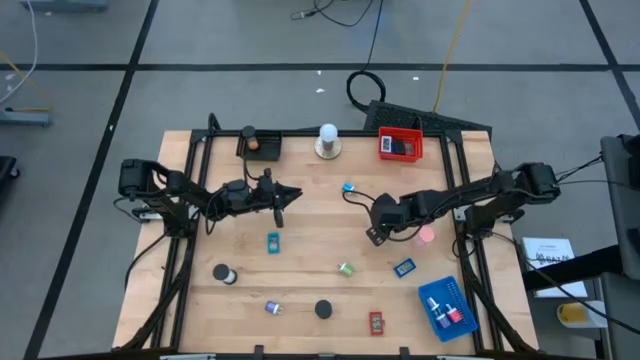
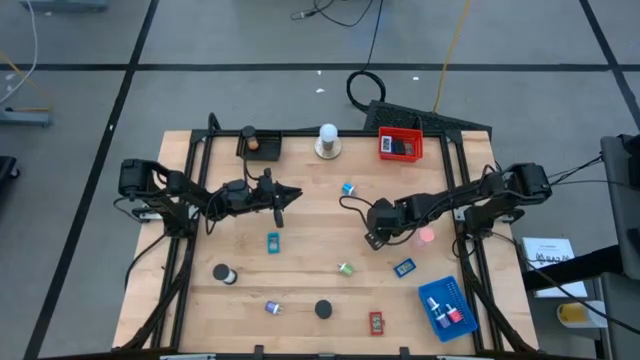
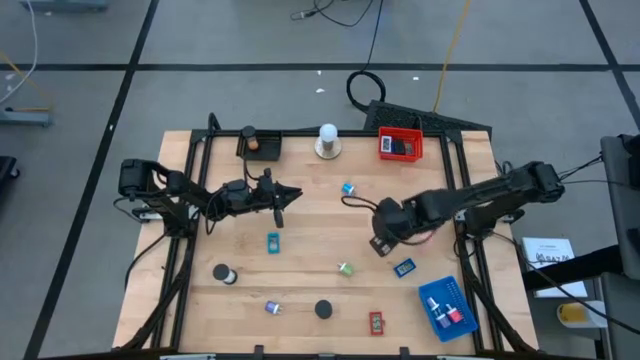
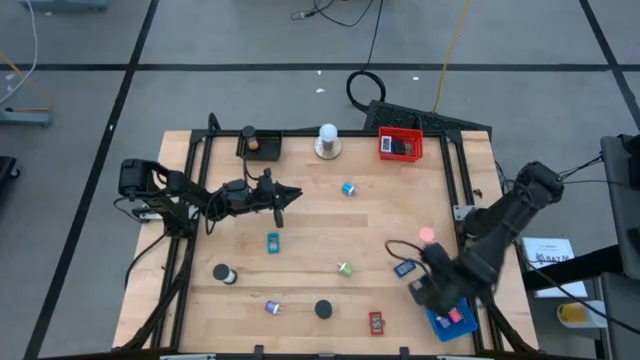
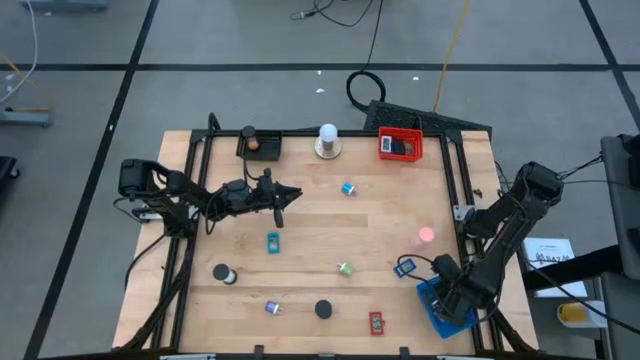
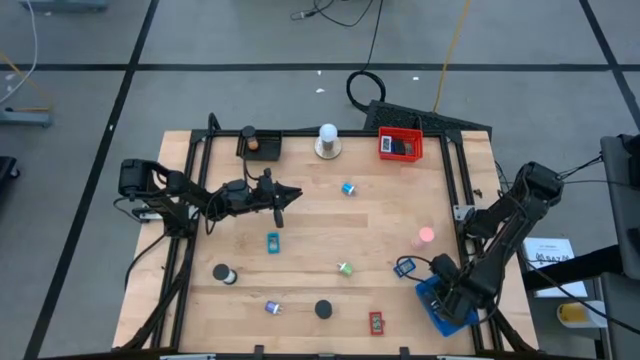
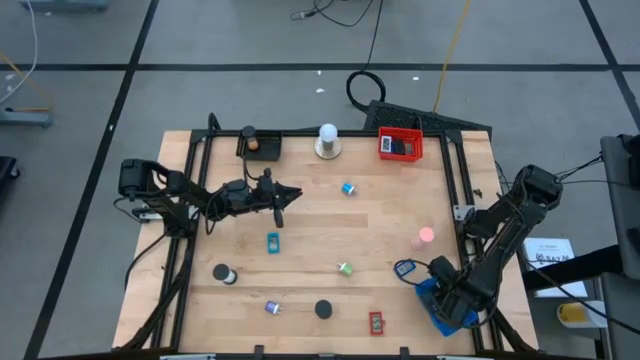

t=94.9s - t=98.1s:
Task: Pick & Place Office items
Put the green charger adapter into the blue bin

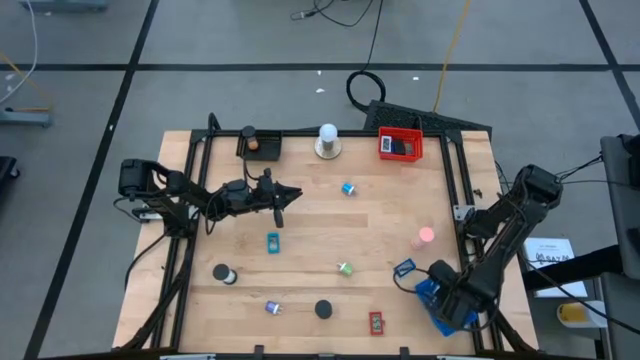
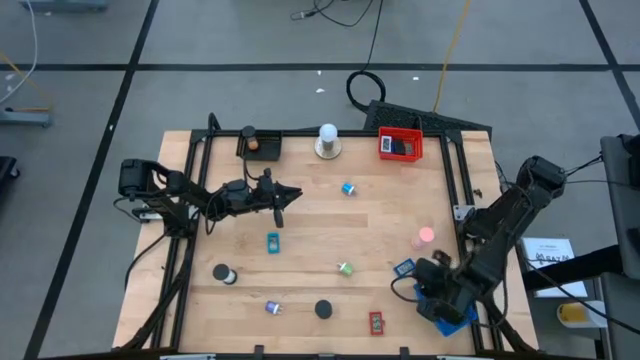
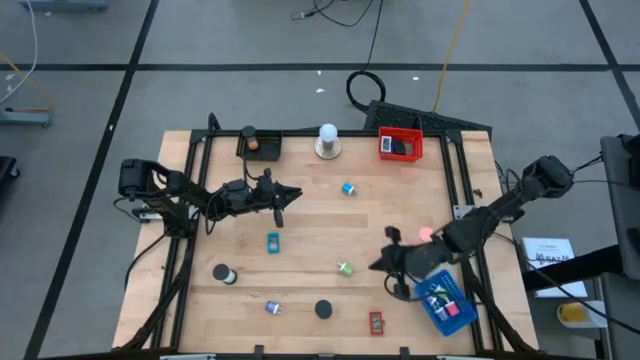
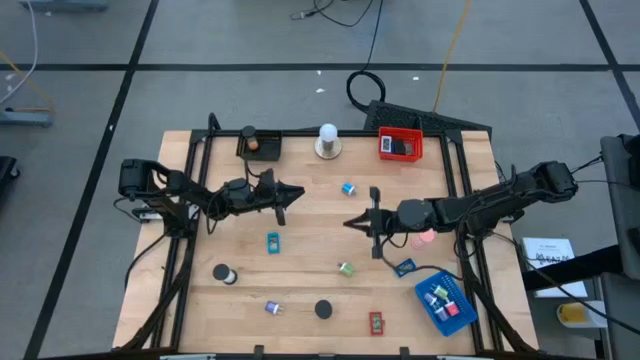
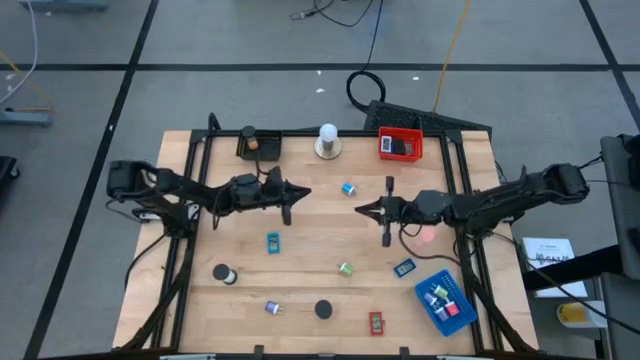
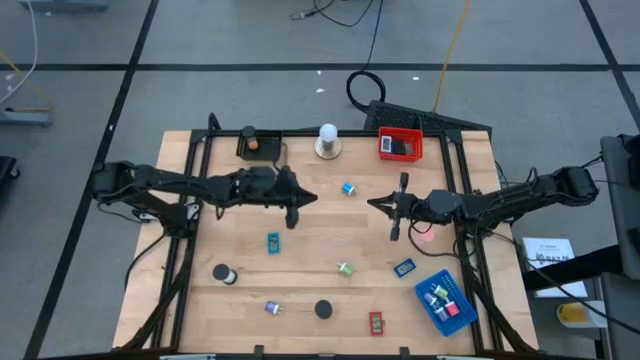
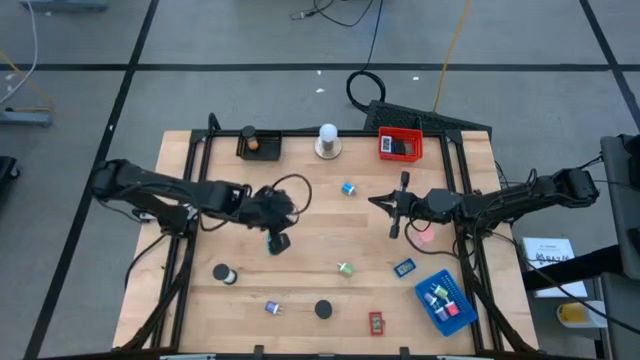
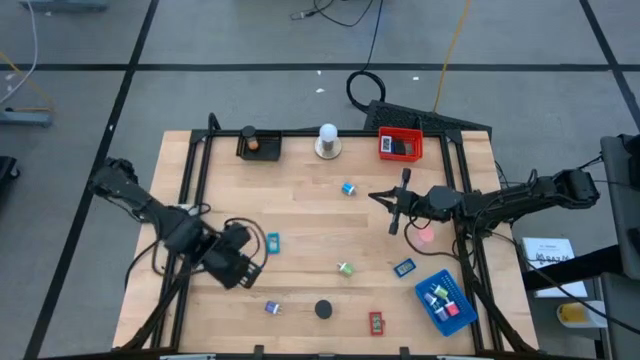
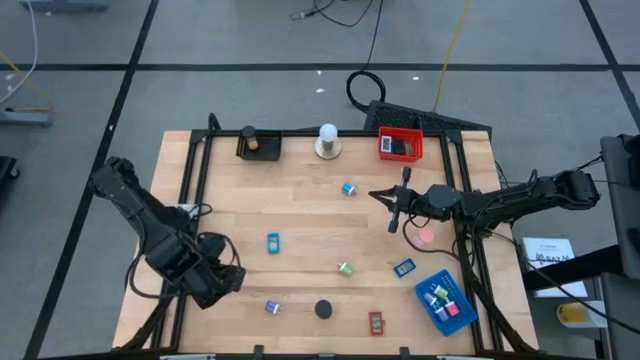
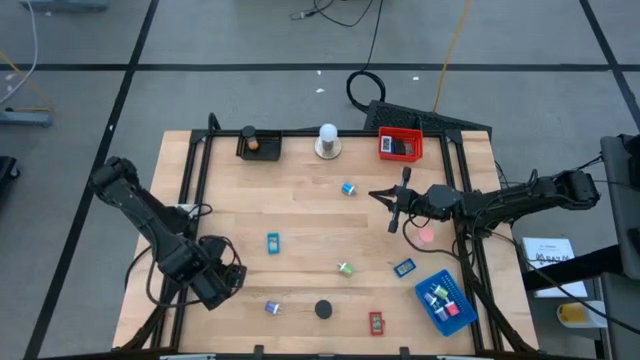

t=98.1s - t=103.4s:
Put the white hourglass into the black bin

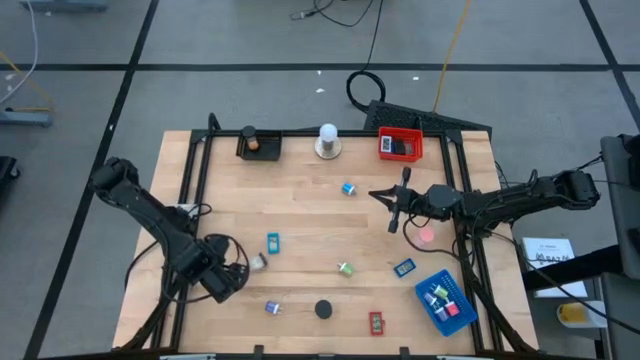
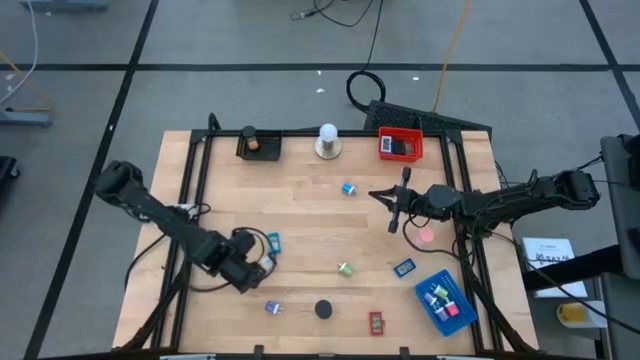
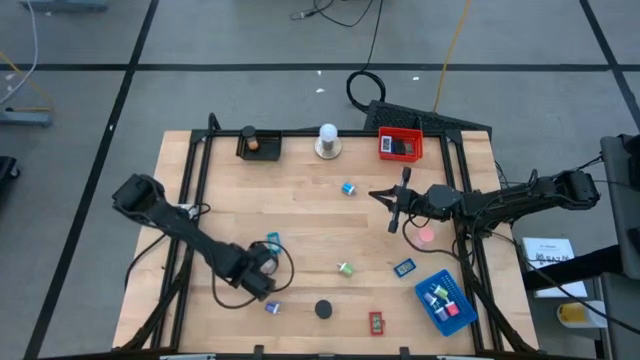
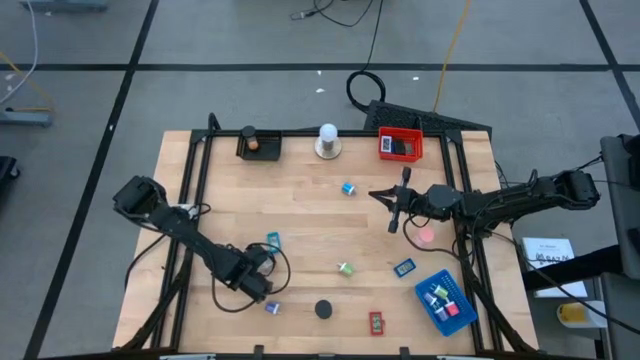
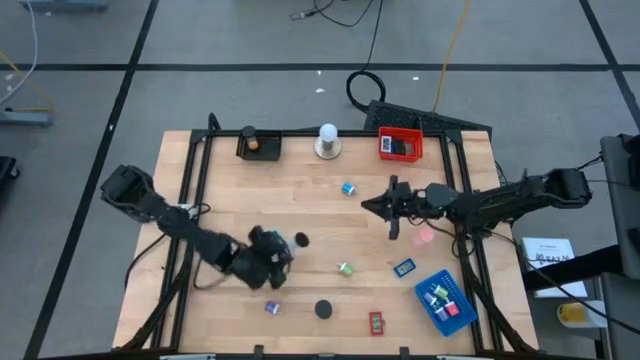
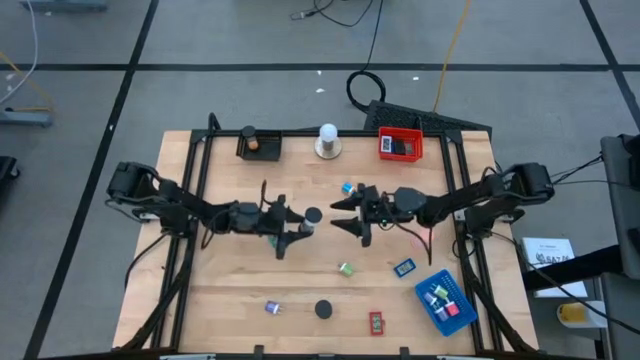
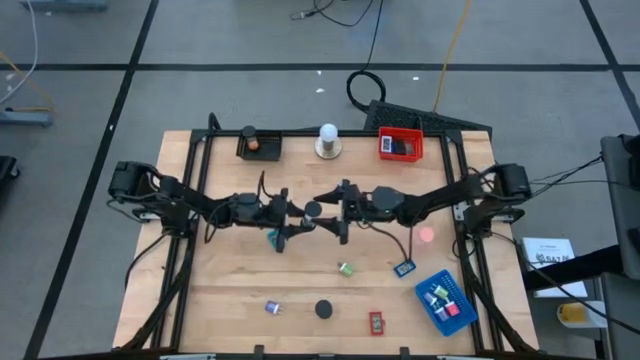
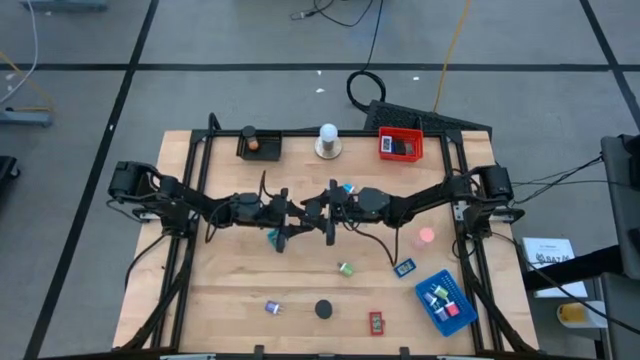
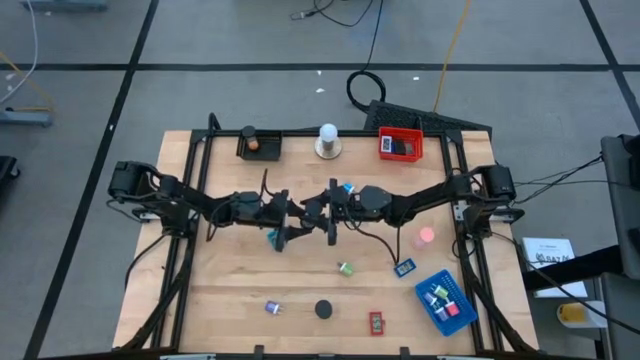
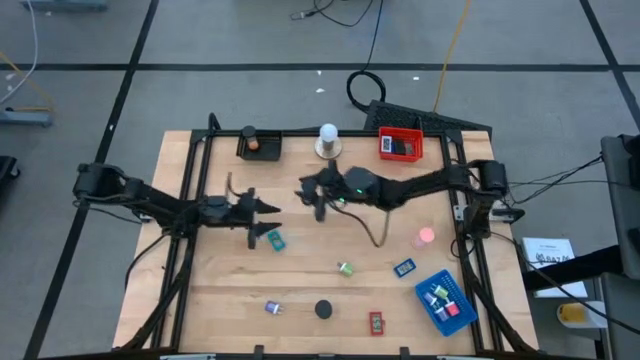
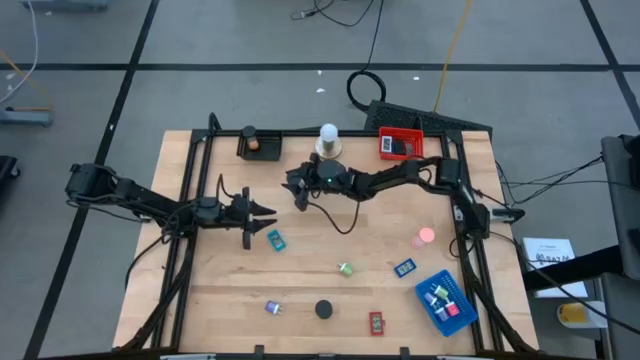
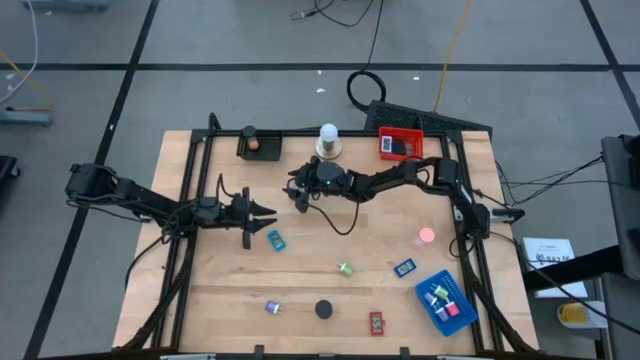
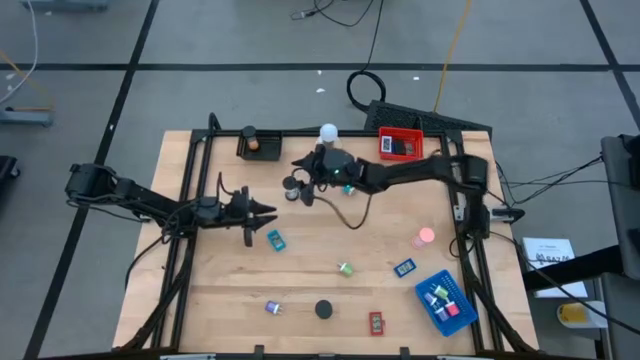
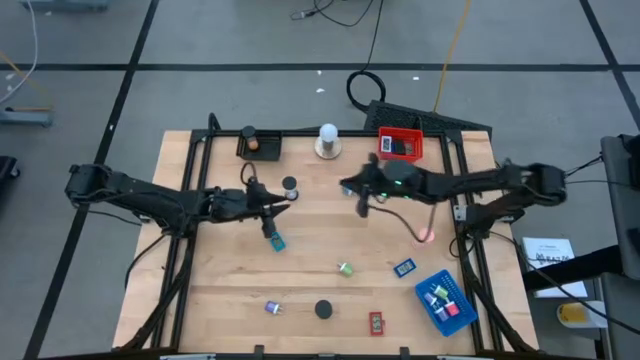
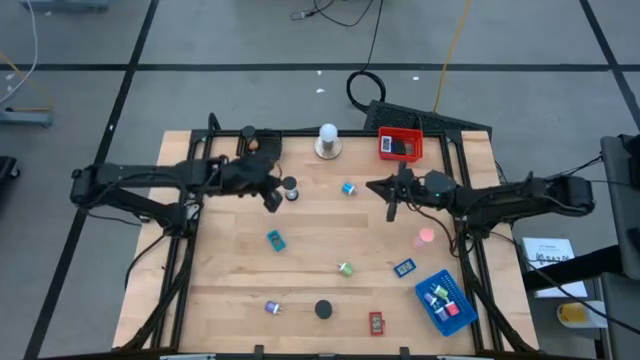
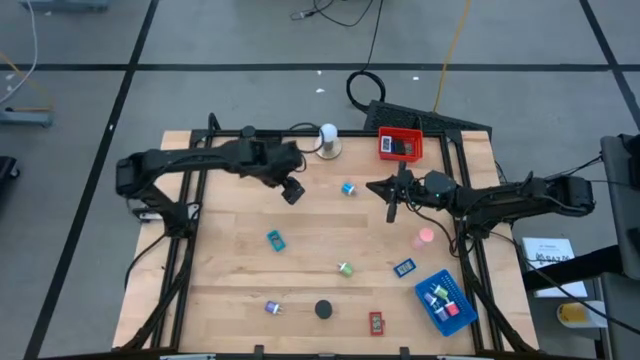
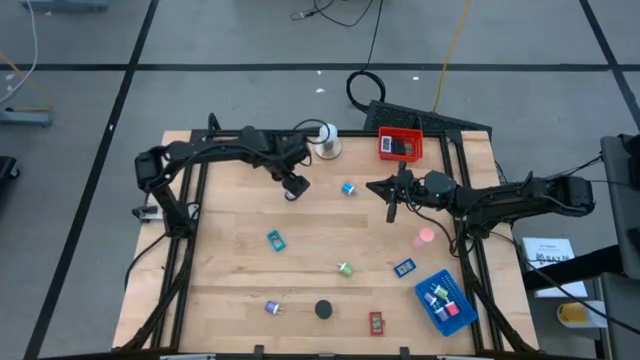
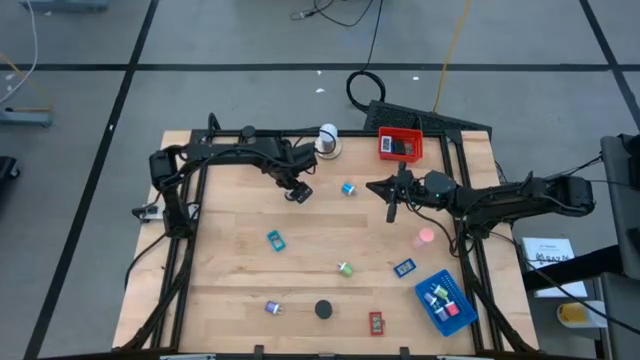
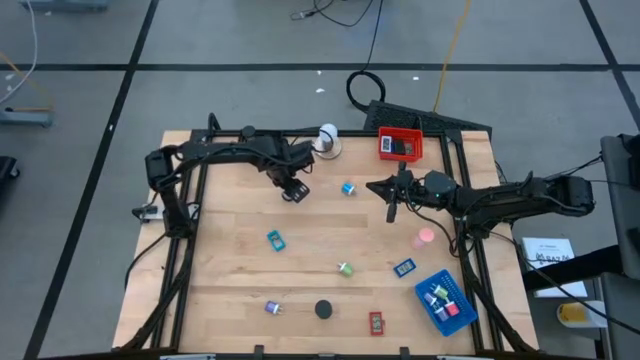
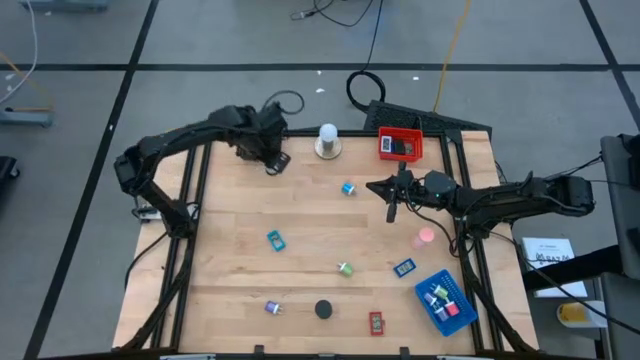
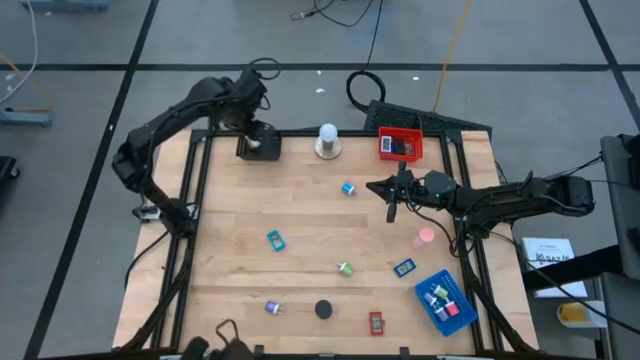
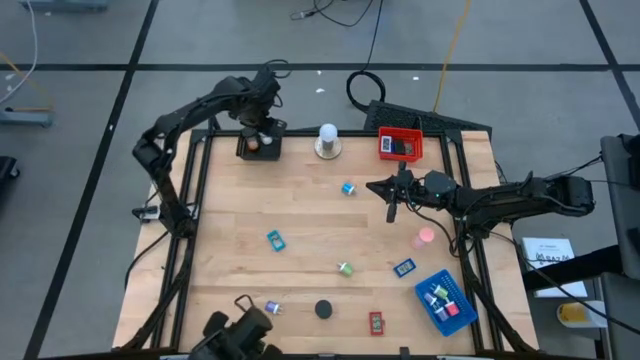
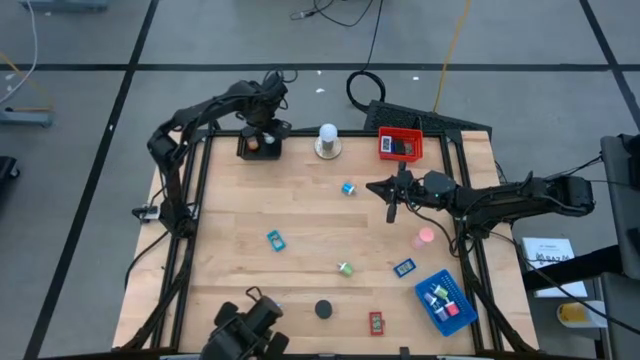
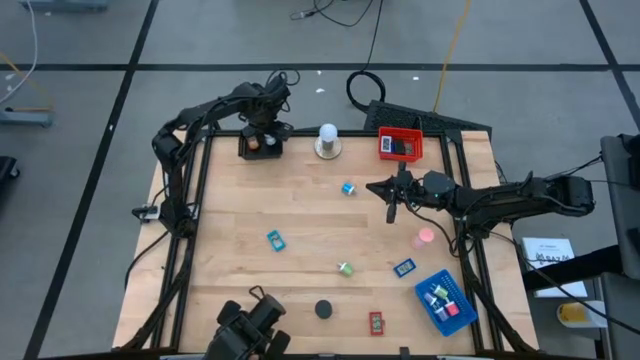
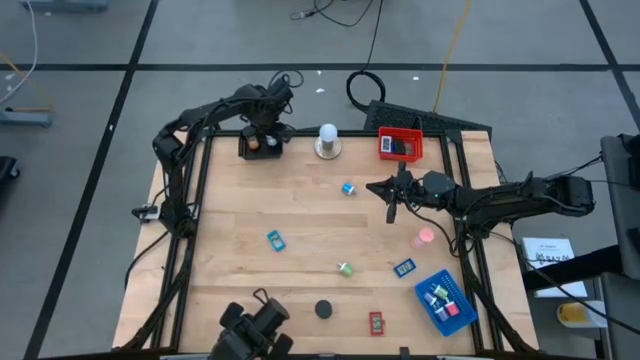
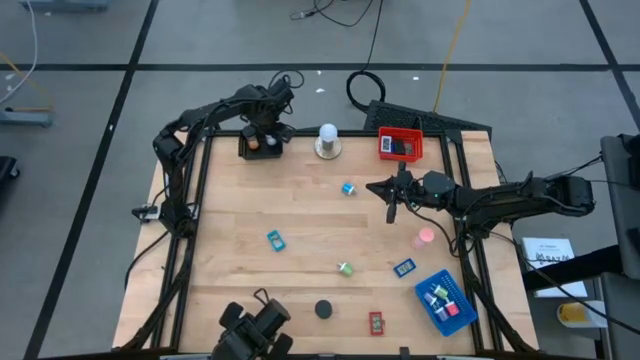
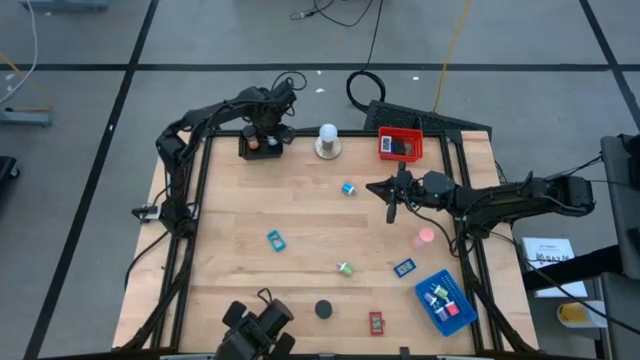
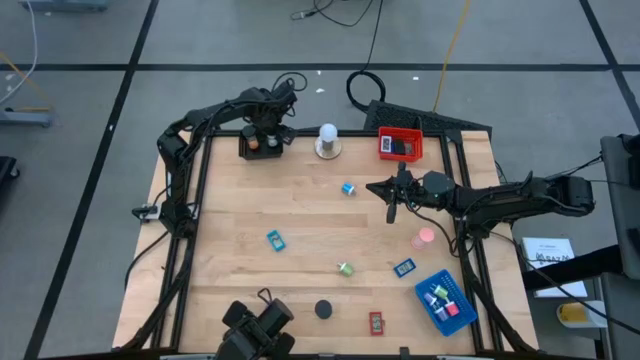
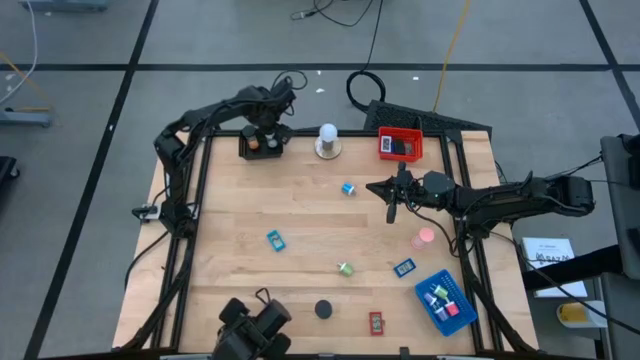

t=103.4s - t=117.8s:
Put the white hourglass into the black bin
